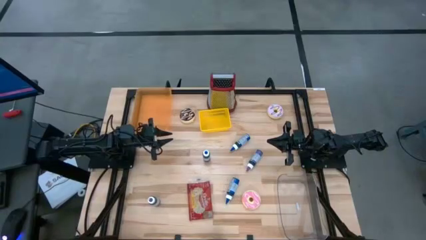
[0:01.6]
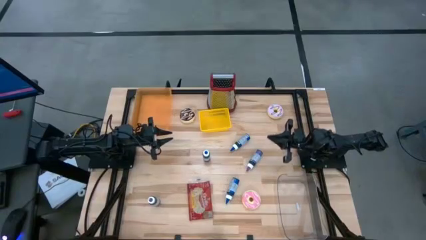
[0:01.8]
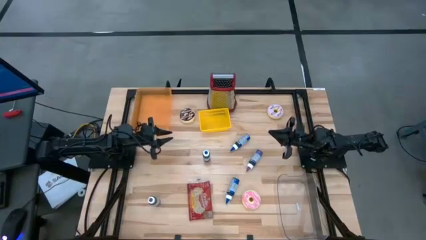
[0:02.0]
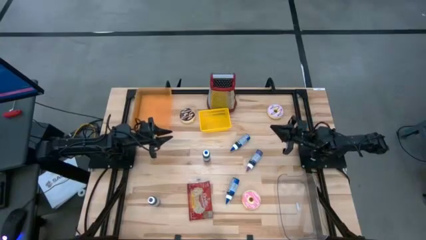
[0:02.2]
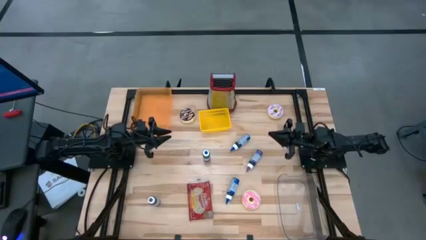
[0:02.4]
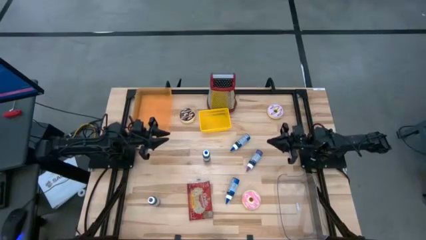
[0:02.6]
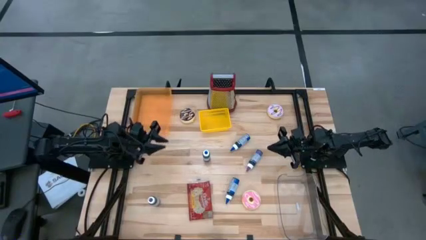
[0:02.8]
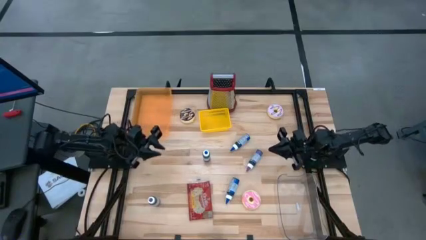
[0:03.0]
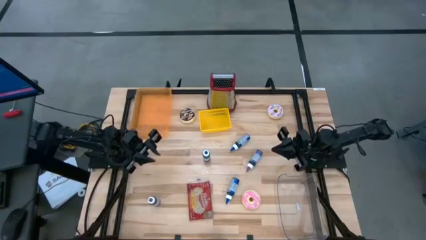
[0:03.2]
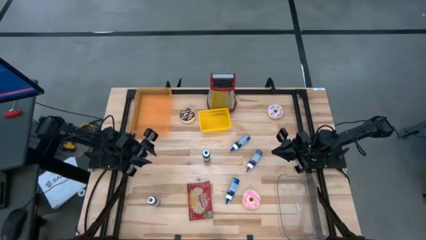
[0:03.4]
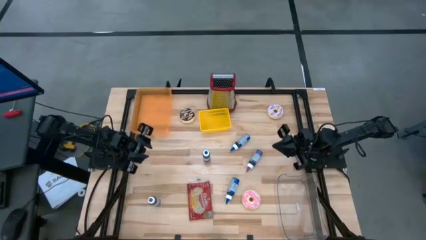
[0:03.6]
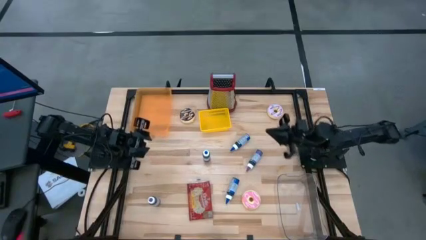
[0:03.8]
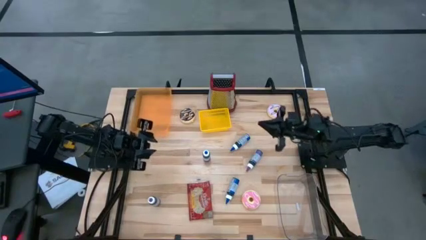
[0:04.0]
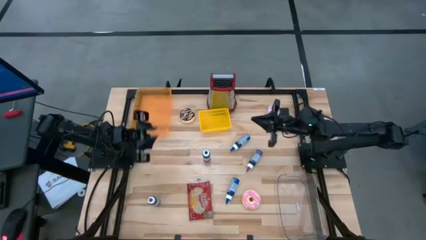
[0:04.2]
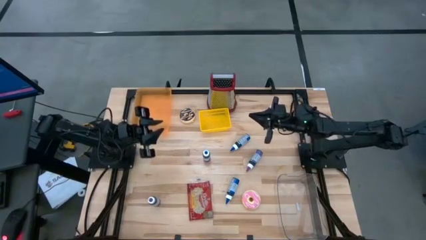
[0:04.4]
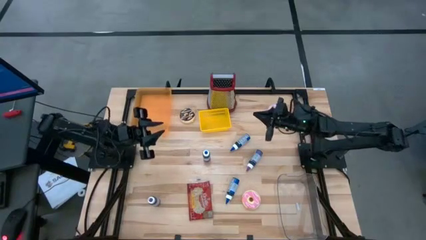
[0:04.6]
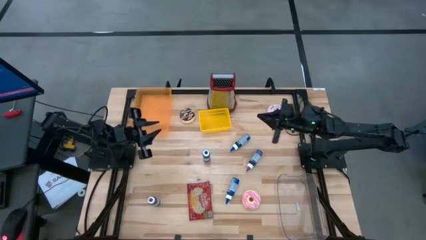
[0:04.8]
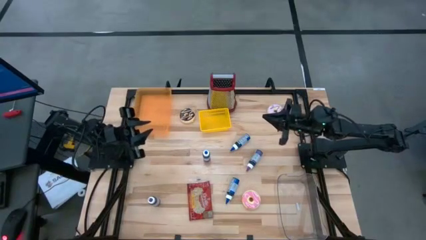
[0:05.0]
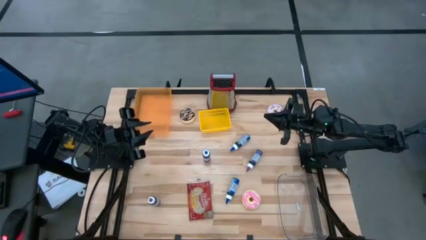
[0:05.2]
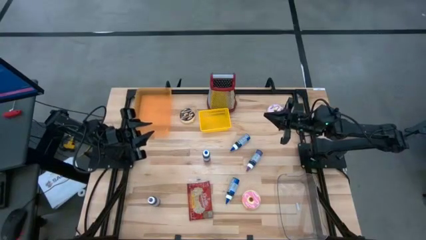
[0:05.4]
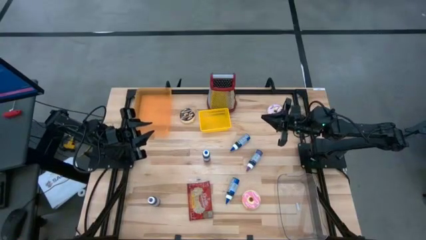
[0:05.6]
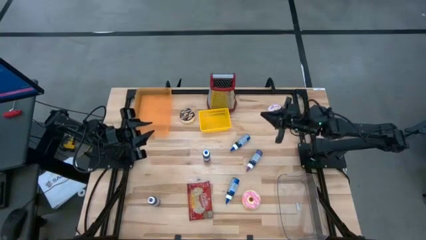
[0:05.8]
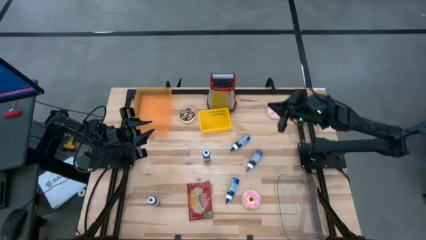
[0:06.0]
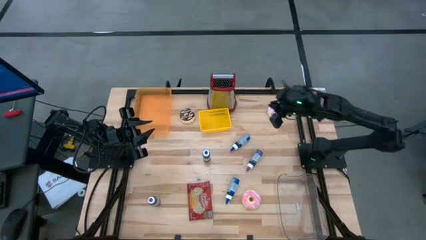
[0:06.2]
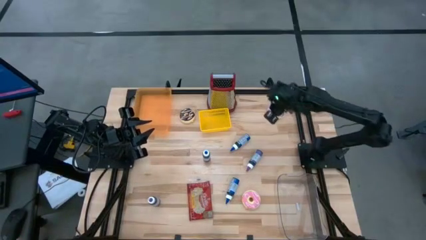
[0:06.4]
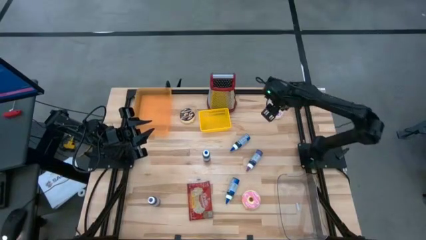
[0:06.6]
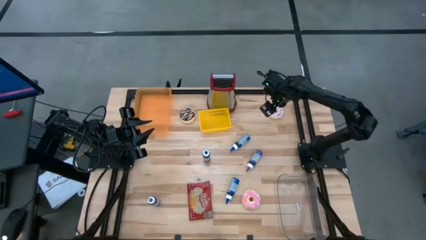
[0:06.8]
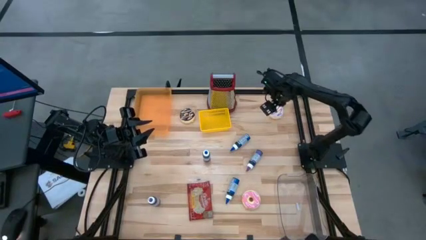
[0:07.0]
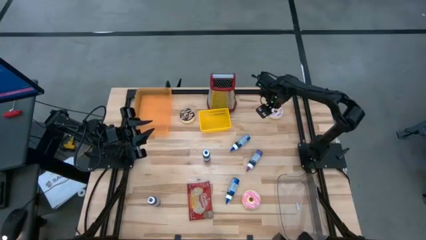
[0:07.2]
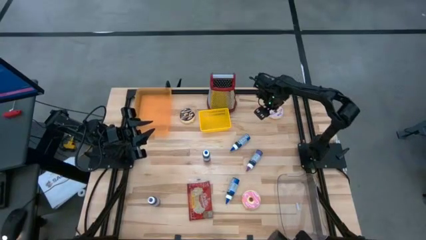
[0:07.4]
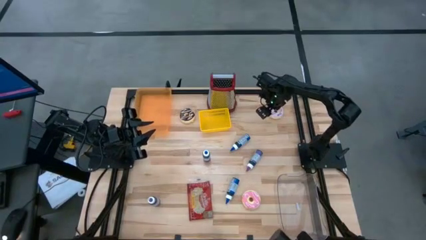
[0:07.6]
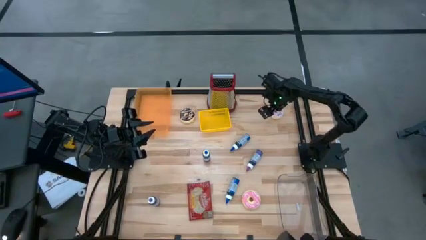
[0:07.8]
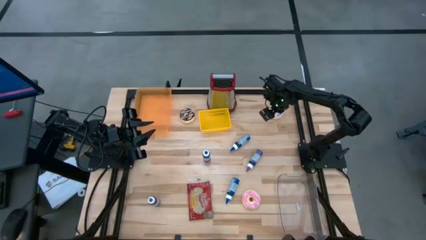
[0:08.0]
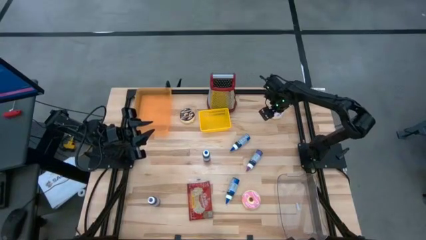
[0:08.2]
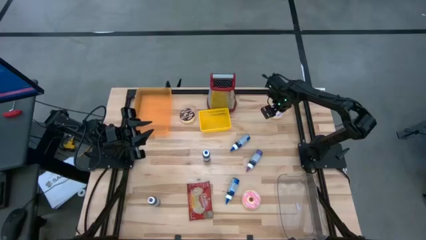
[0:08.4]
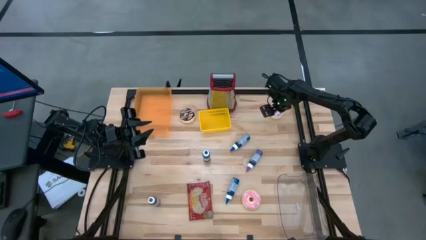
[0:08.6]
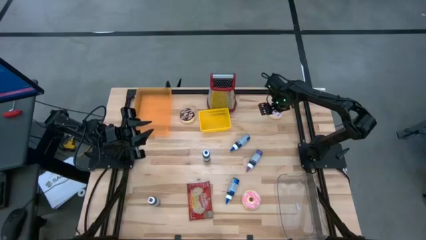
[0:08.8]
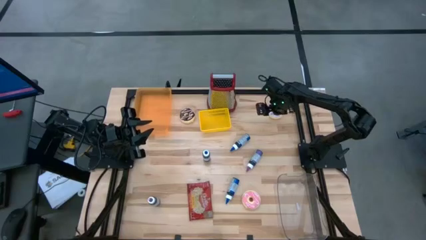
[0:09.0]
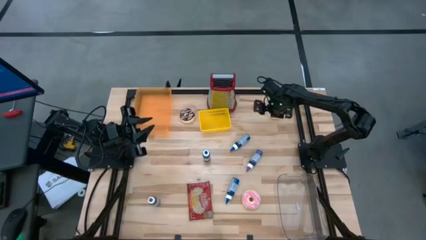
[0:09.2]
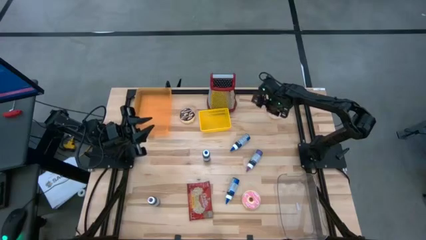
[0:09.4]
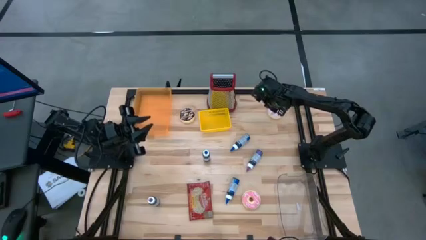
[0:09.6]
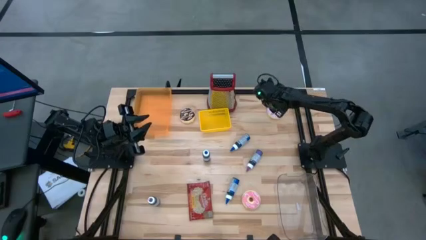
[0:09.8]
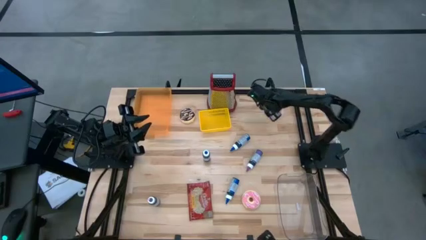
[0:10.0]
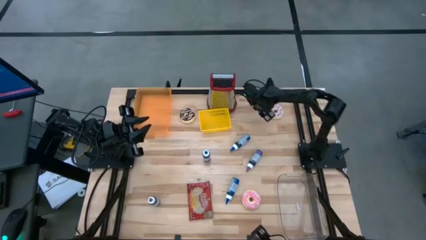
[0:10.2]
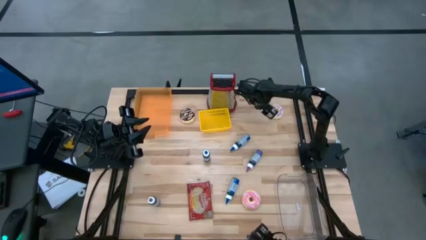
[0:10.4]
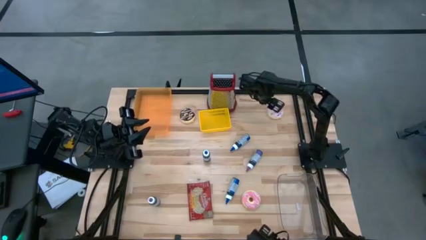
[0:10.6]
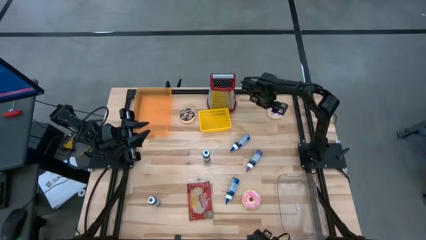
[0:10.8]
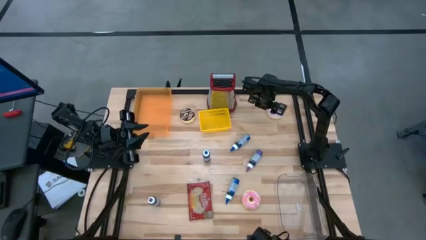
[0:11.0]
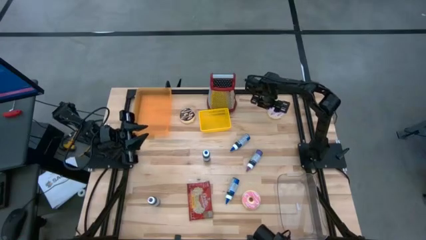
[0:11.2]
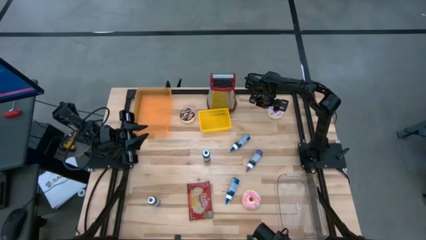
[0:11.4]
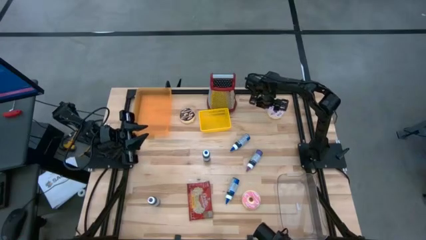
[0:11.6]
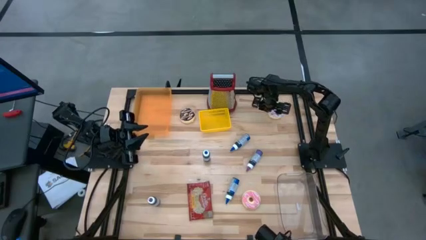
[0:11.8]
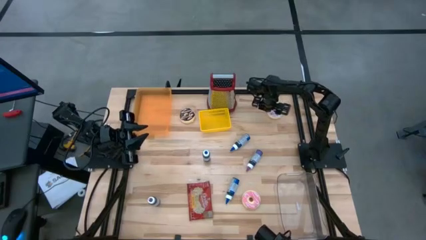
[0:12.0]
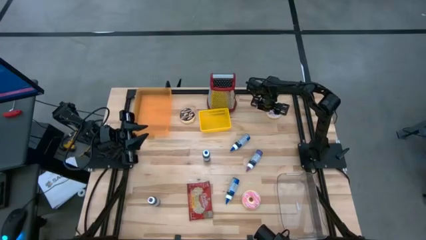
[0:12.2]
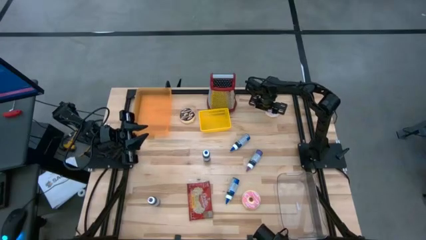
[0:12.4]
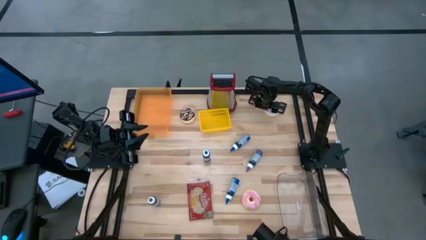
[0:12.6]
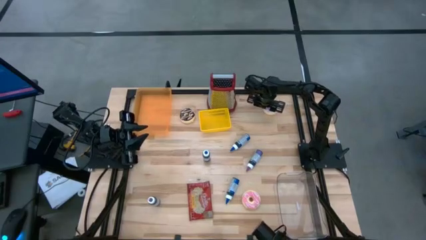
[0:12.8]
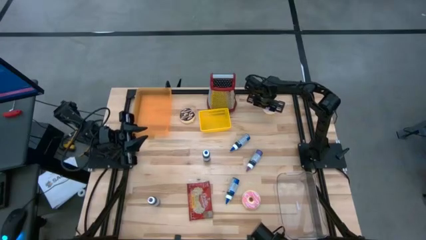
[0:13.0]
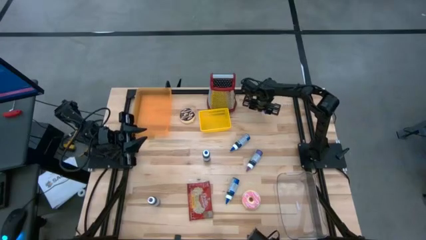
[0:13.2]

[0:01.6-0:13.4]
Put the purple donut into the yellow bin
